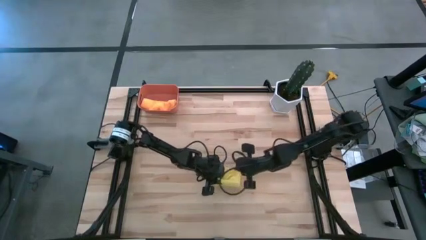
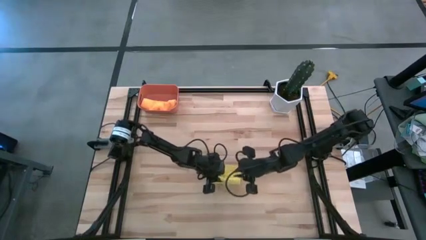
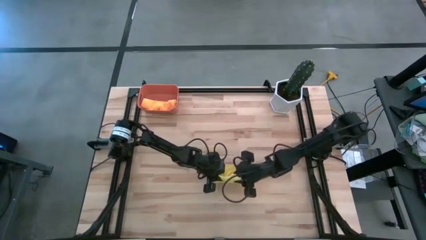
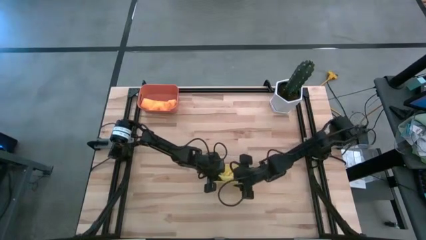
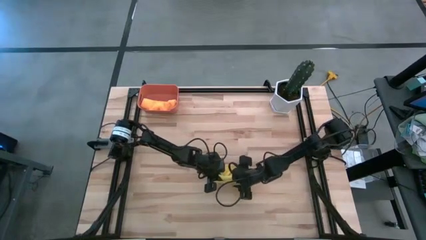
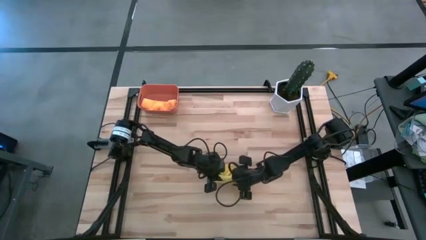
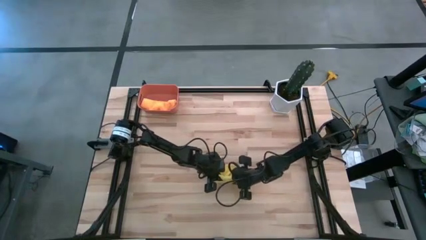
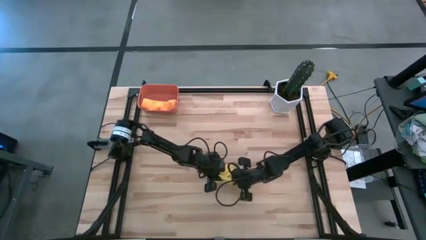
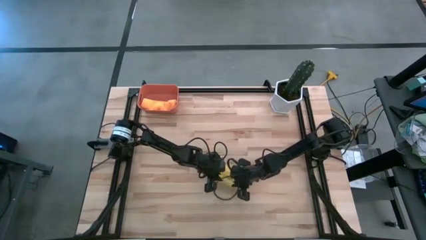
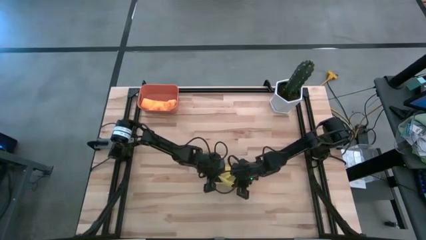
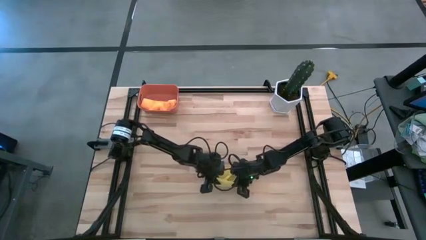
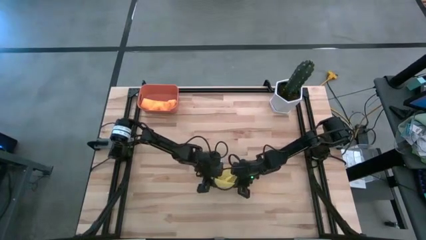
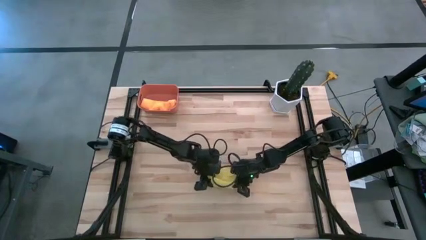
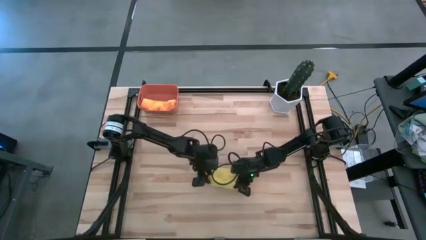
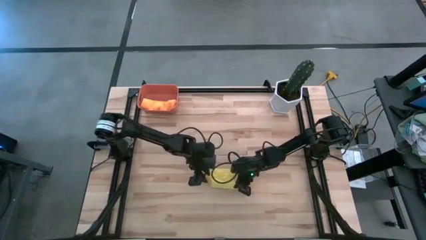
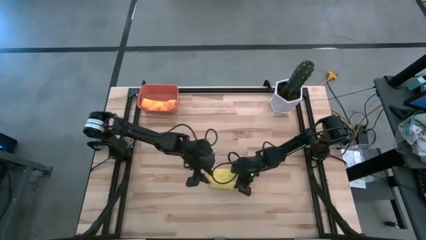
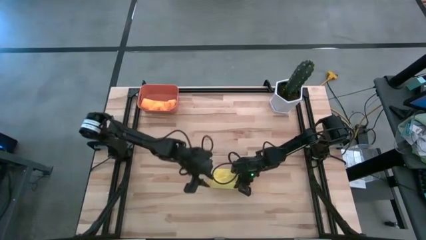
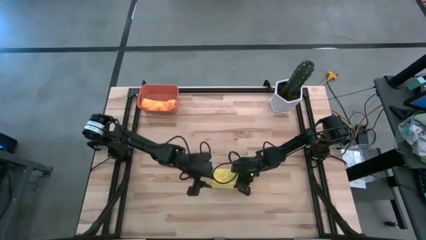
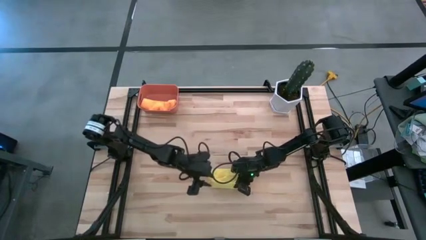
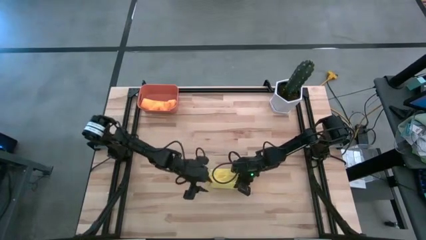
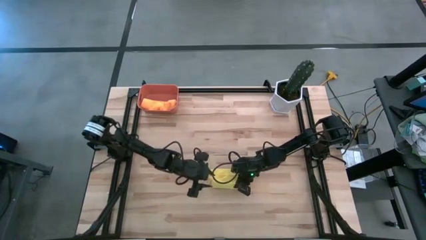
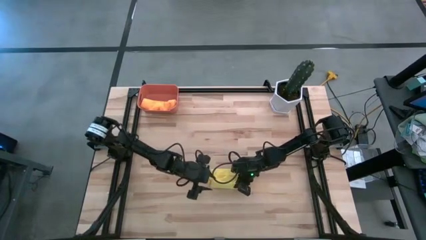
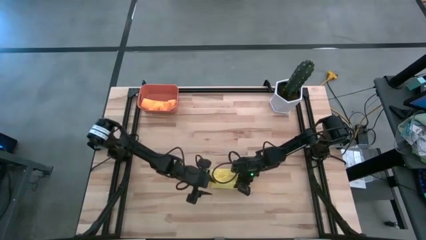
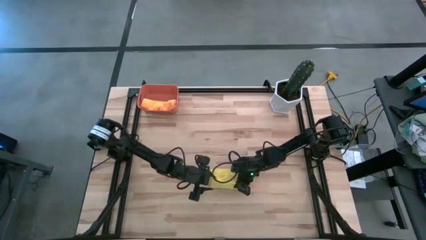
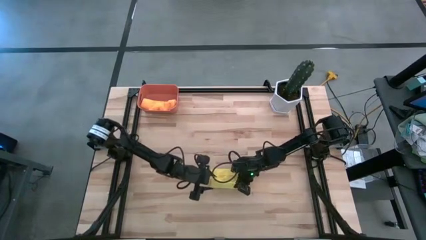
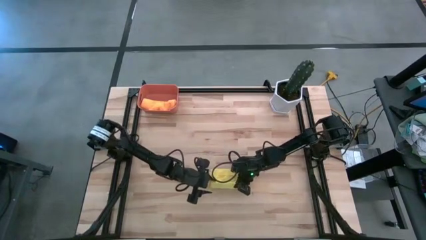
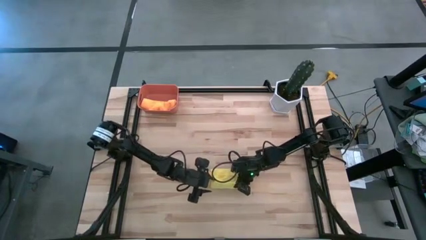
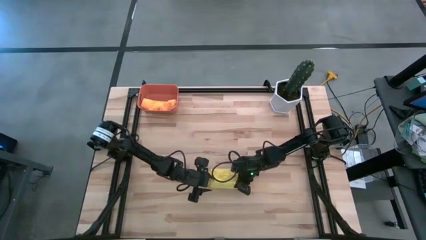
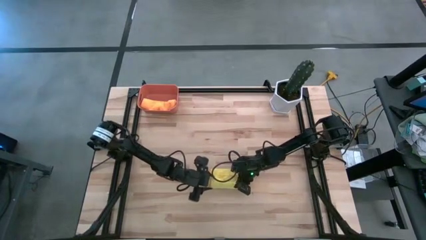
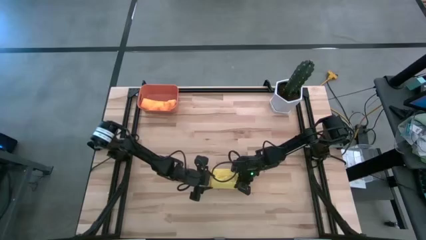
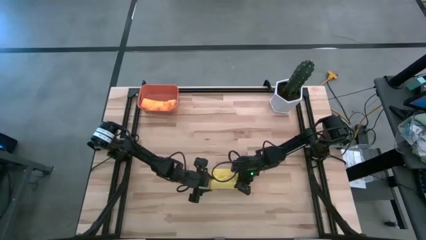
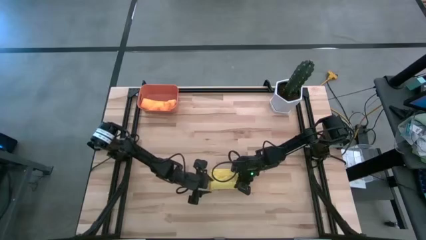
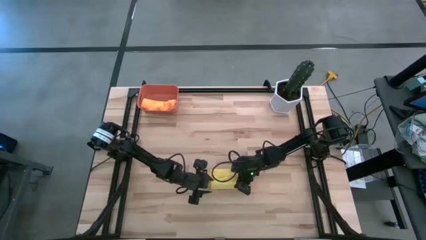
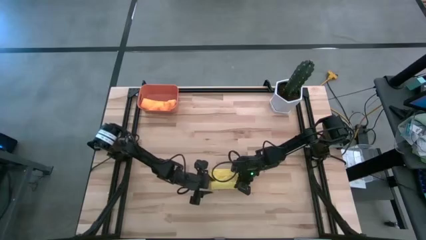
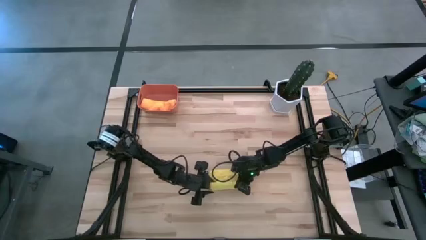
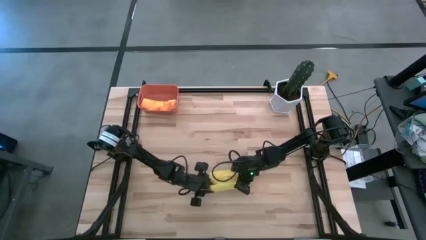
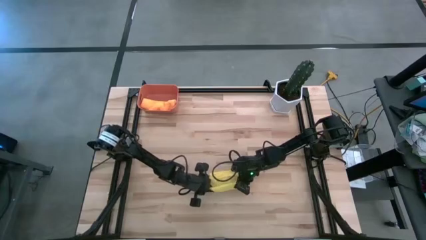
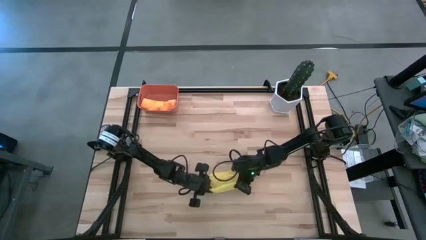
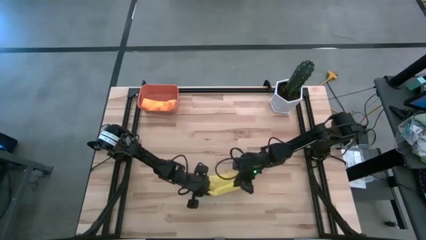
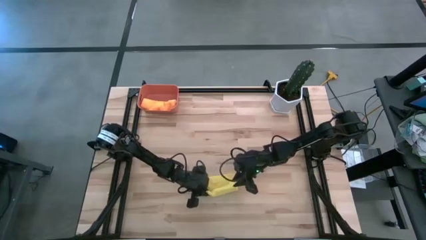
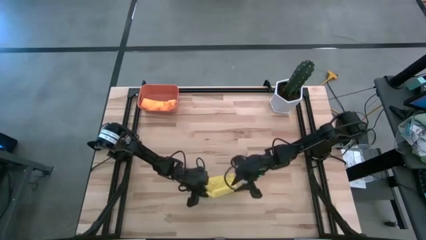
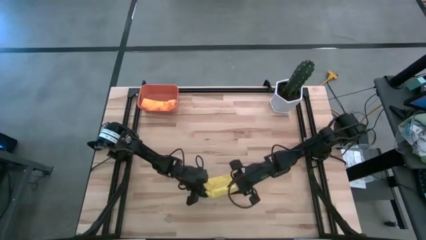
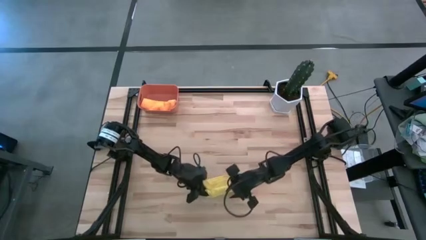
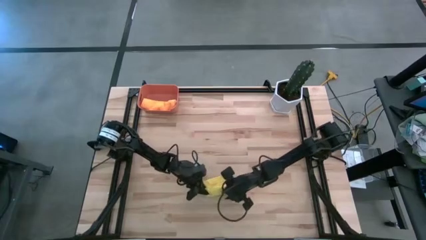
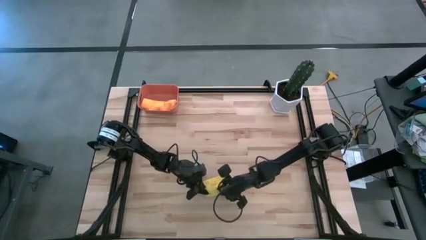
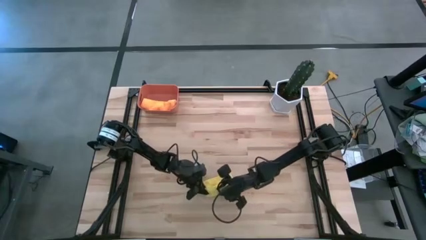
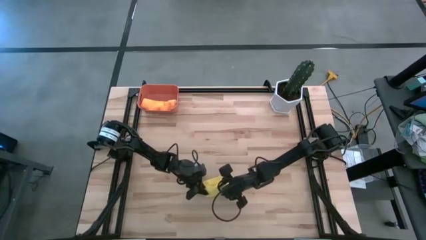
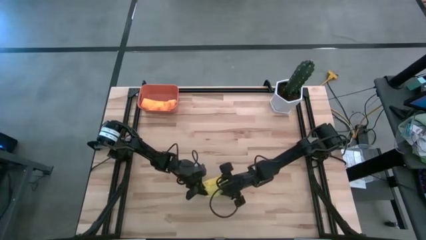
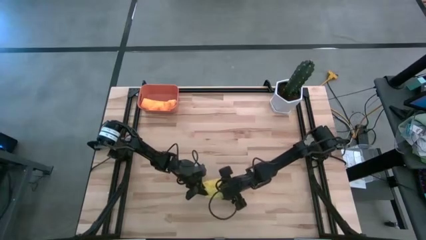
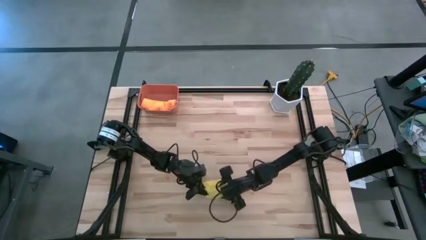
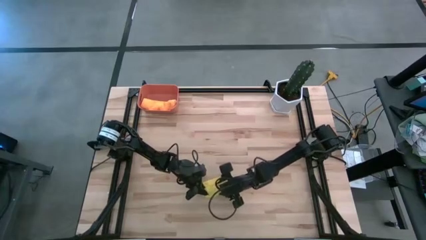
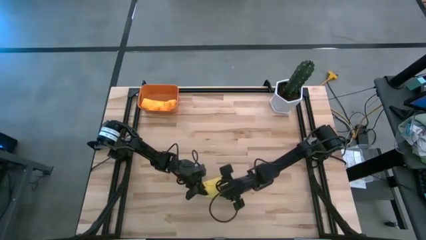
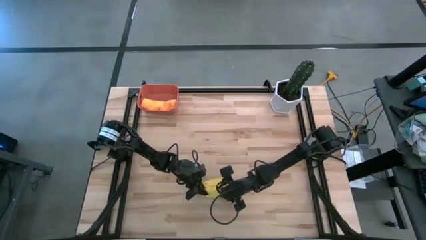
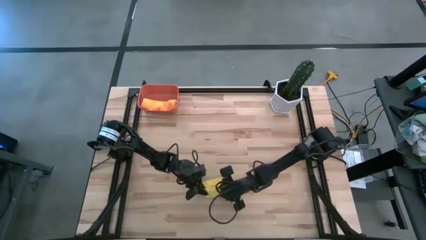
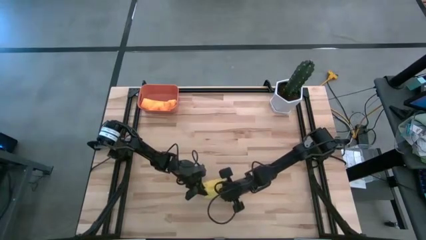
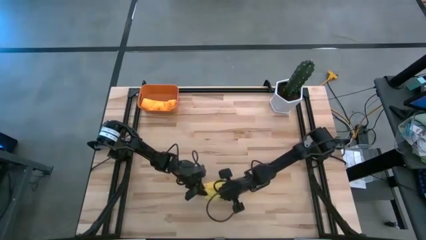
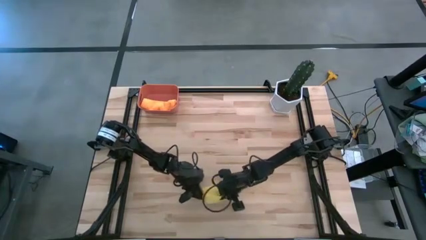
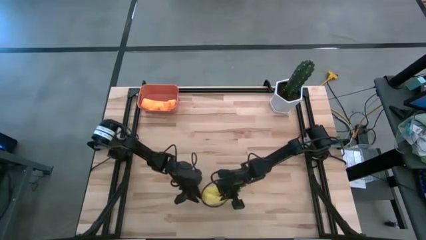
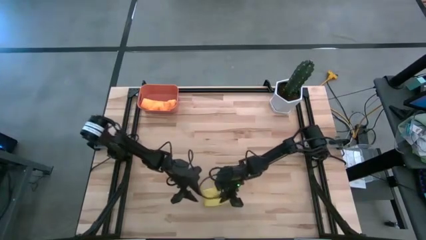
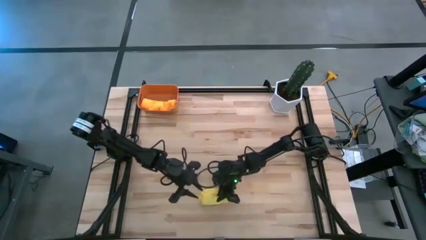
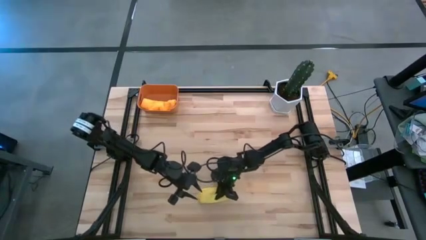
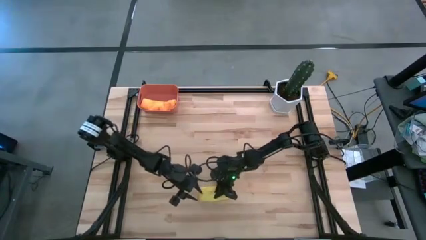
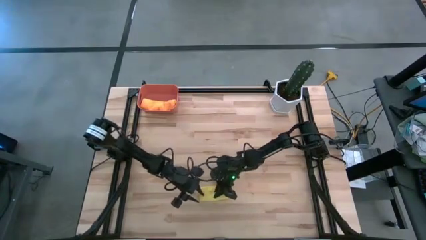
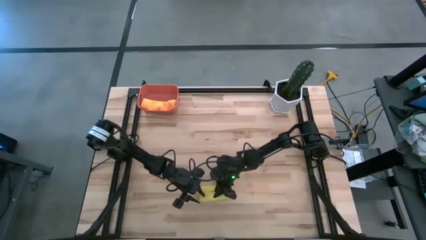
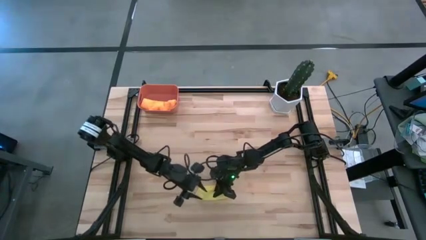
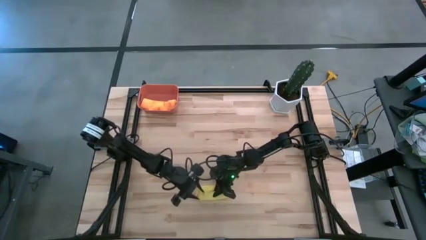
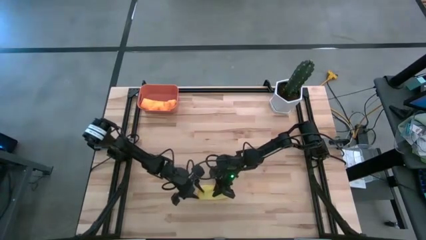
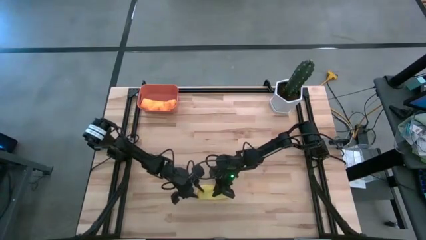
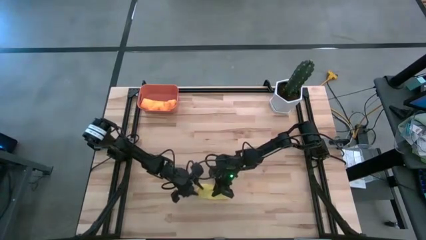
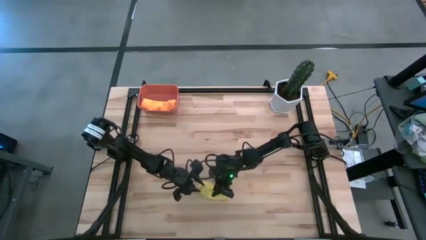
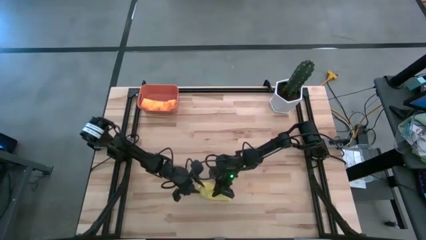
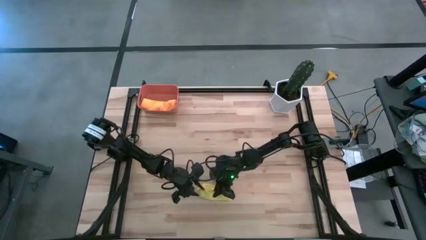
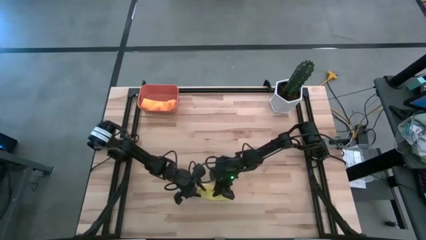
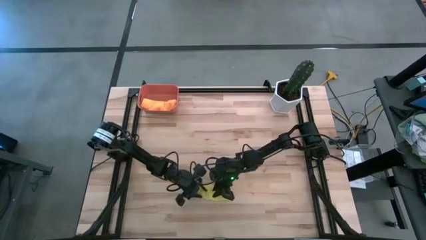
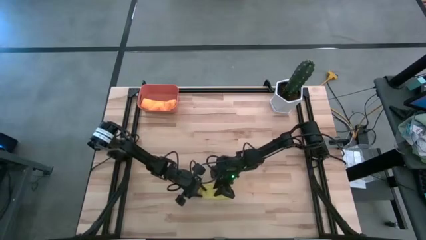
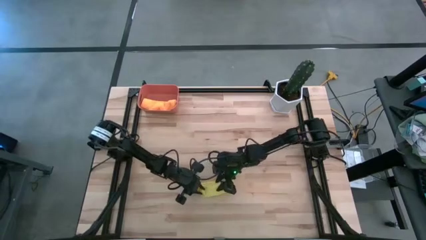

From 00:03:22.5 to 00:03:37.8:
Task: Roll microfiber towels into tight, uniform cylinder then place into a basket
Roll the yellow towel
